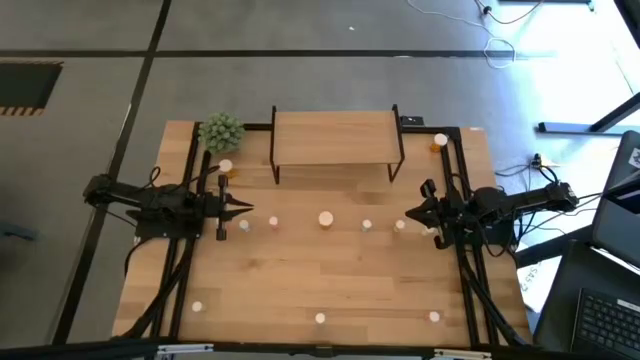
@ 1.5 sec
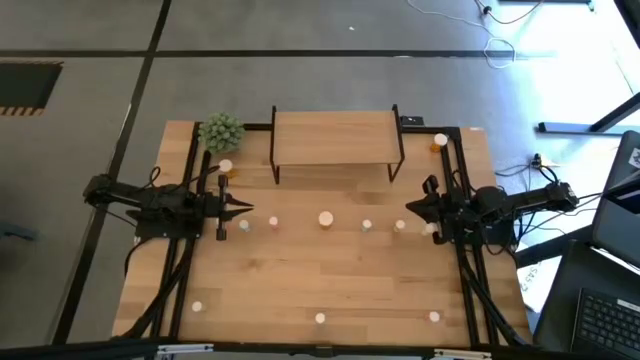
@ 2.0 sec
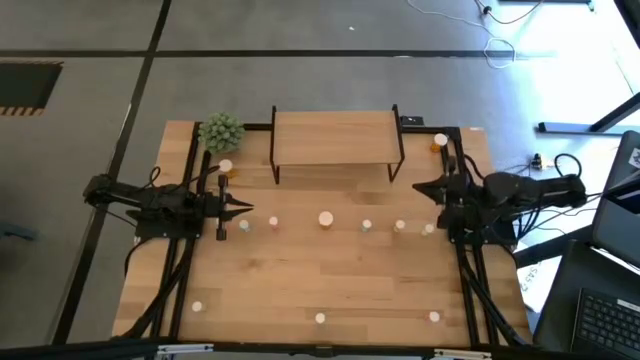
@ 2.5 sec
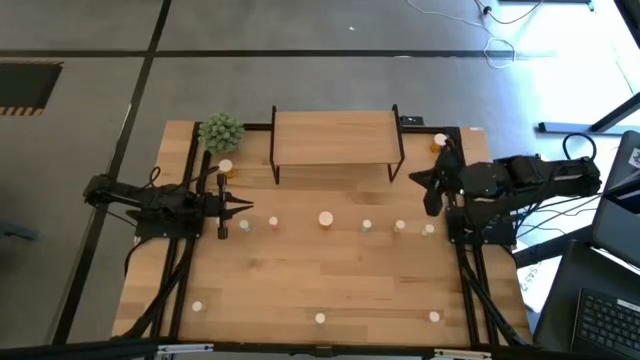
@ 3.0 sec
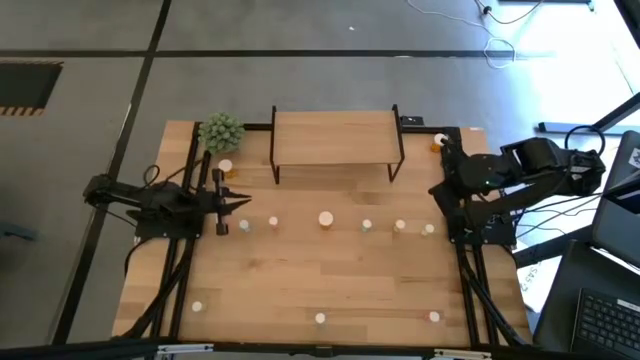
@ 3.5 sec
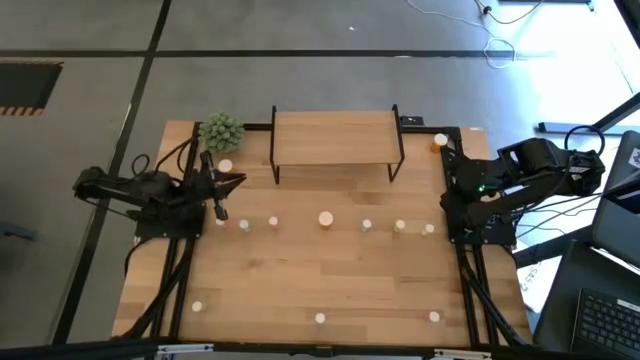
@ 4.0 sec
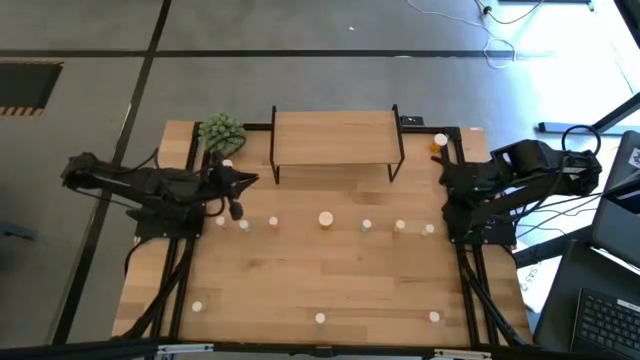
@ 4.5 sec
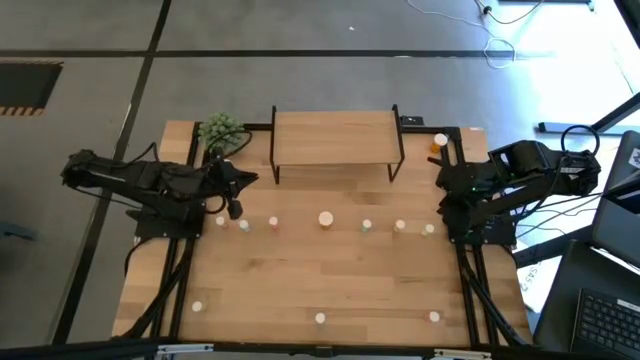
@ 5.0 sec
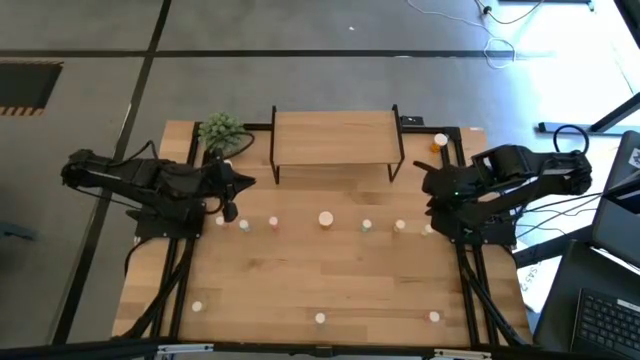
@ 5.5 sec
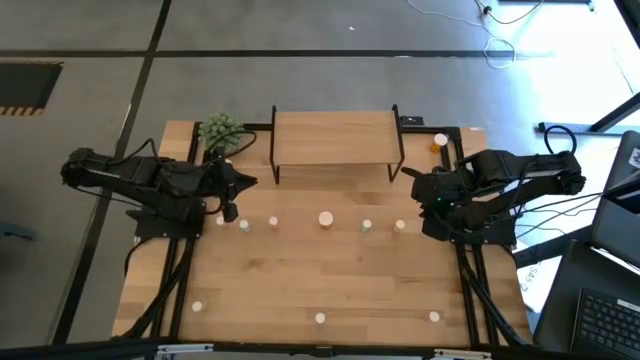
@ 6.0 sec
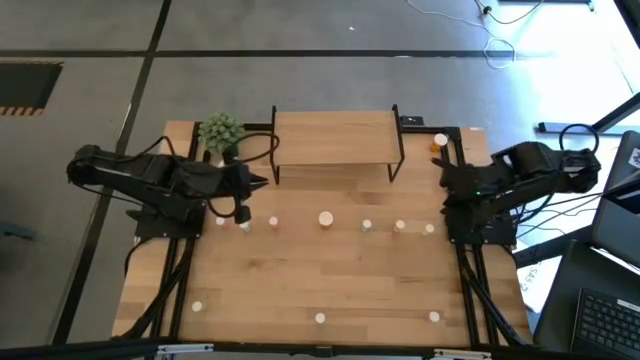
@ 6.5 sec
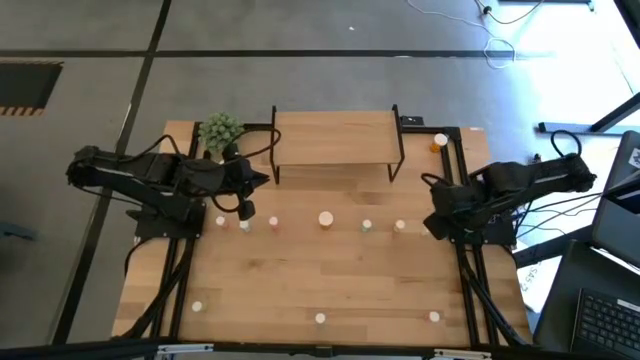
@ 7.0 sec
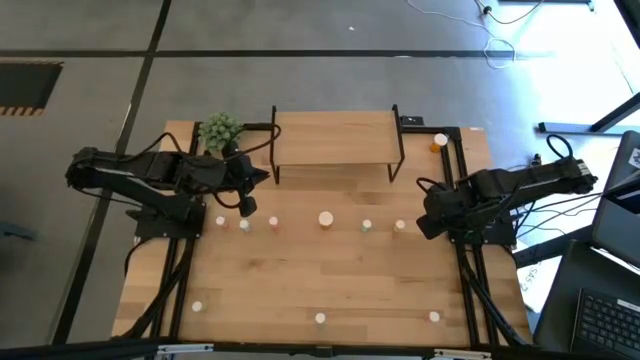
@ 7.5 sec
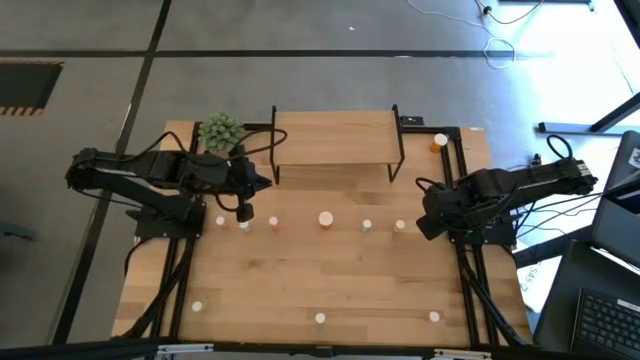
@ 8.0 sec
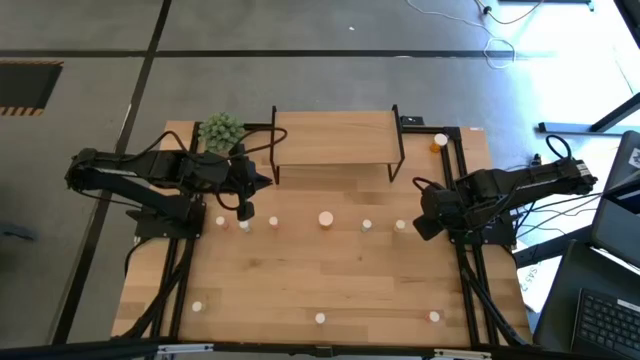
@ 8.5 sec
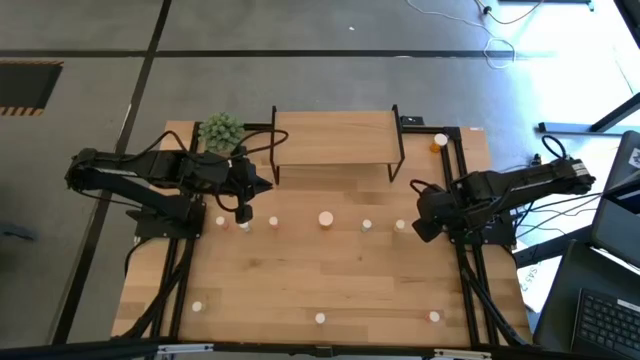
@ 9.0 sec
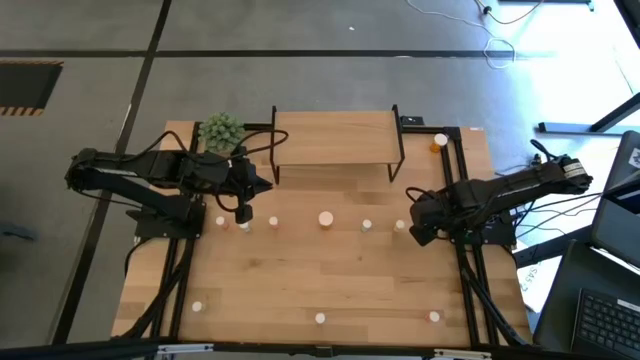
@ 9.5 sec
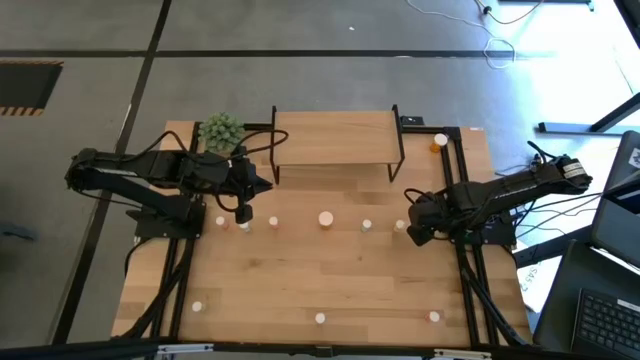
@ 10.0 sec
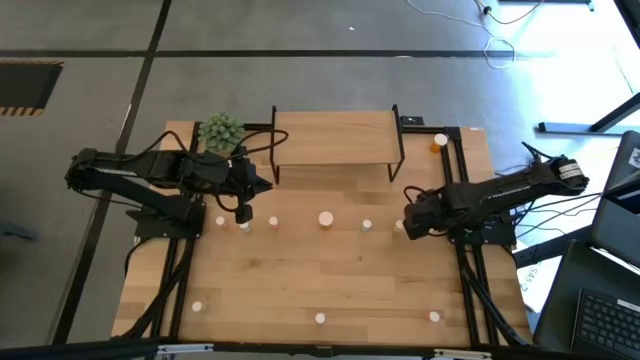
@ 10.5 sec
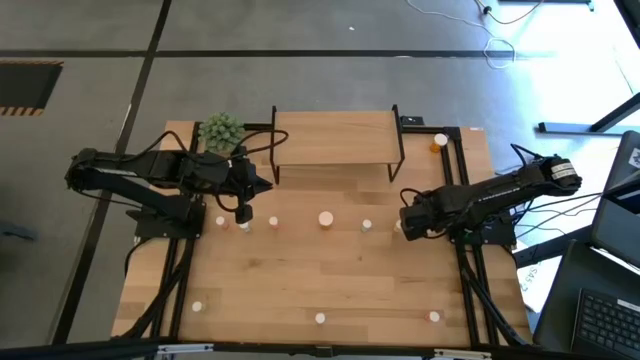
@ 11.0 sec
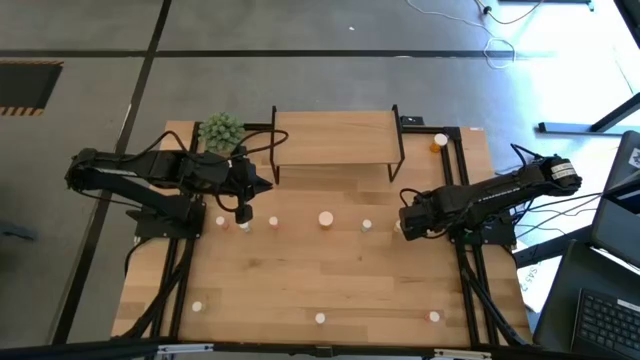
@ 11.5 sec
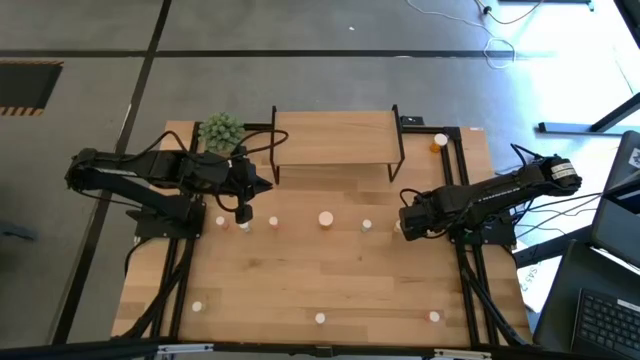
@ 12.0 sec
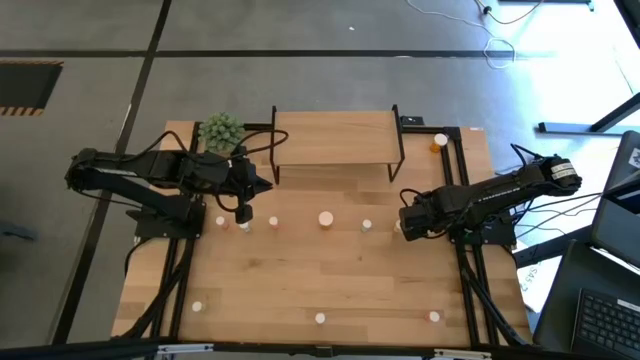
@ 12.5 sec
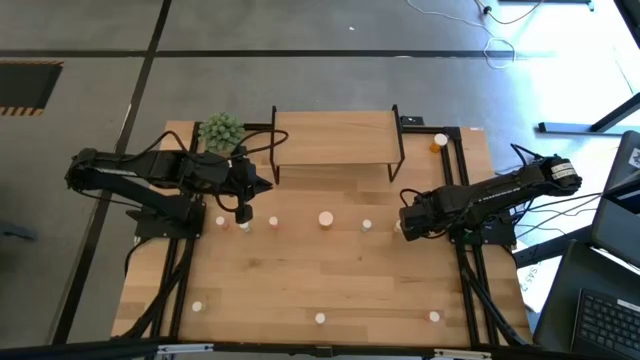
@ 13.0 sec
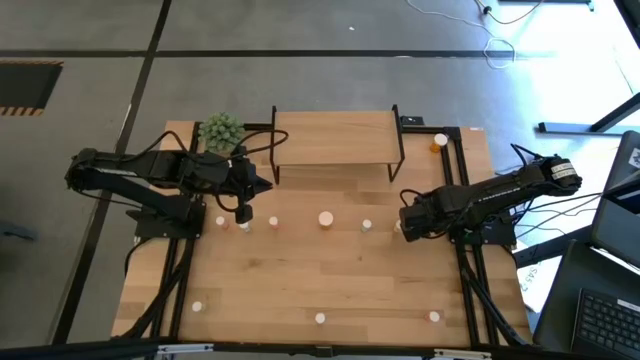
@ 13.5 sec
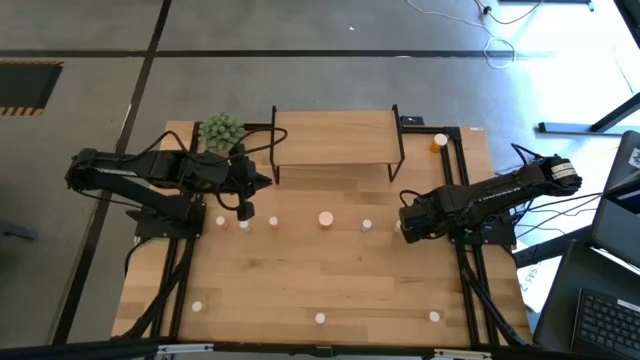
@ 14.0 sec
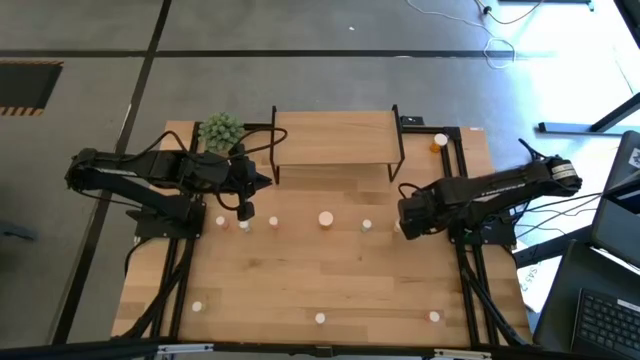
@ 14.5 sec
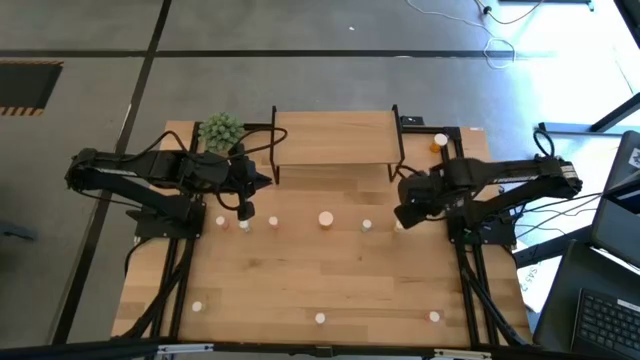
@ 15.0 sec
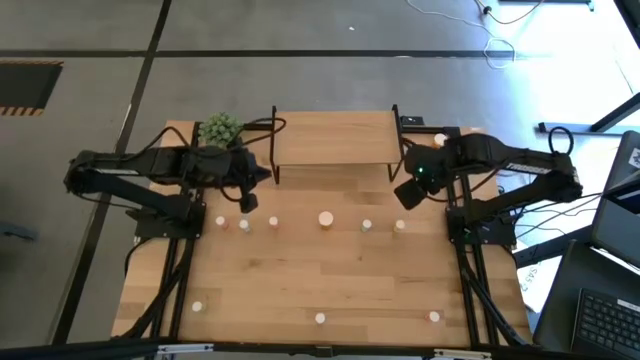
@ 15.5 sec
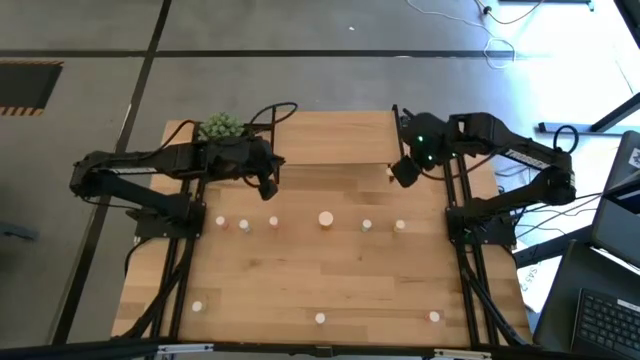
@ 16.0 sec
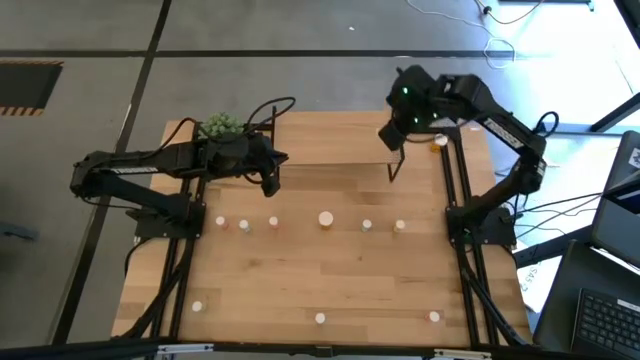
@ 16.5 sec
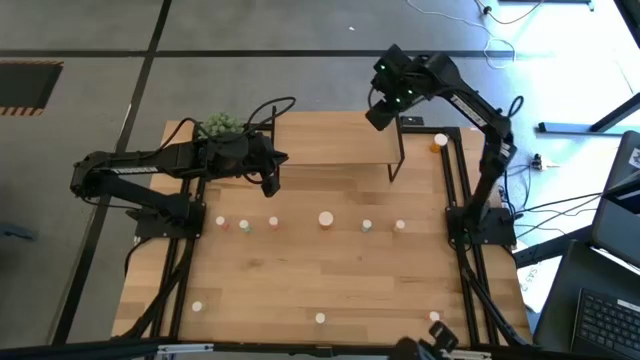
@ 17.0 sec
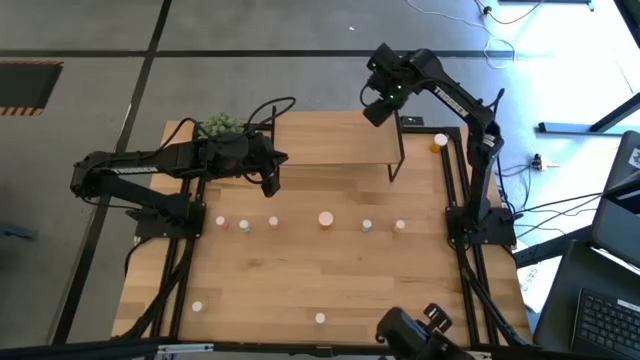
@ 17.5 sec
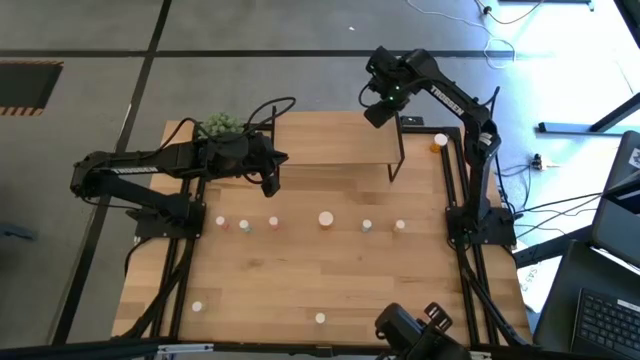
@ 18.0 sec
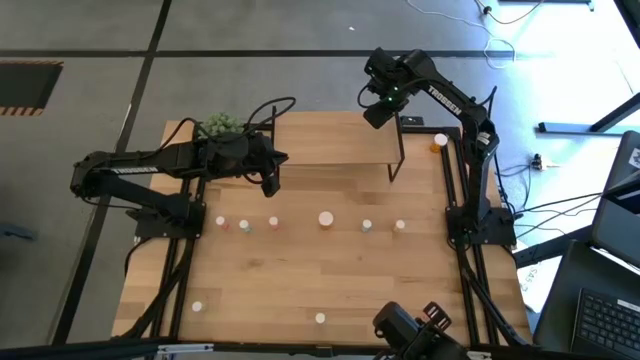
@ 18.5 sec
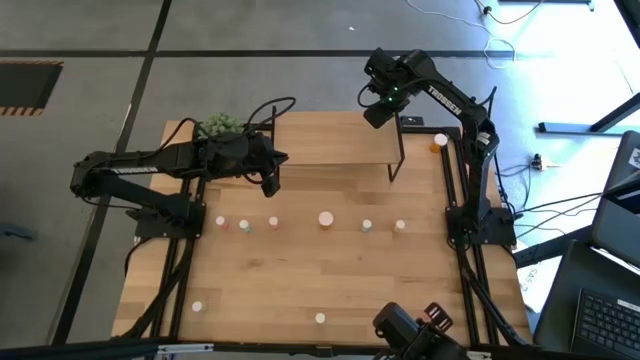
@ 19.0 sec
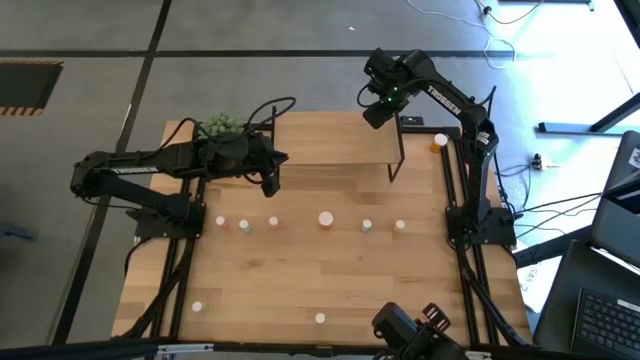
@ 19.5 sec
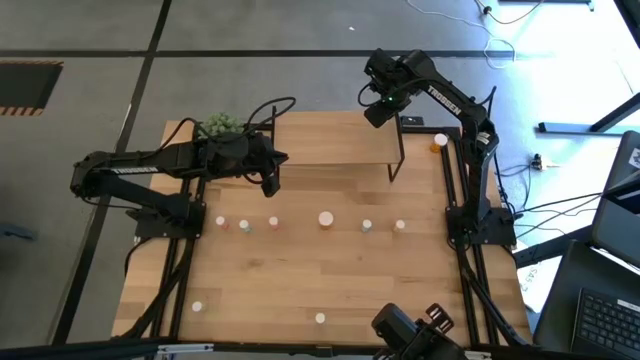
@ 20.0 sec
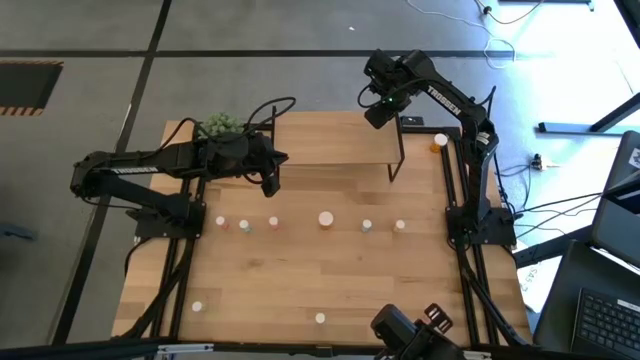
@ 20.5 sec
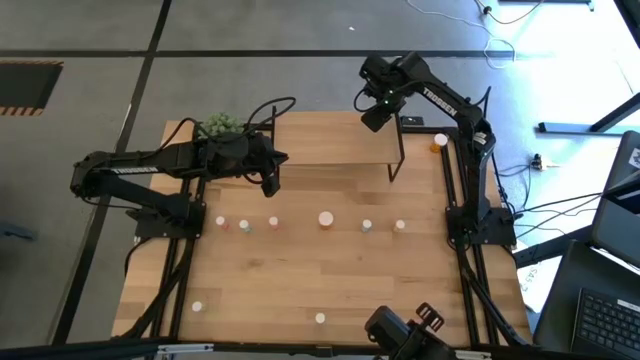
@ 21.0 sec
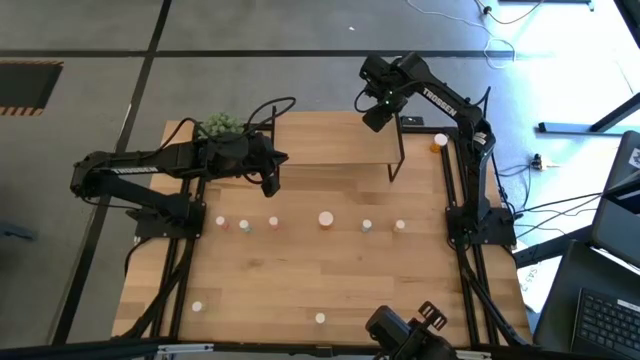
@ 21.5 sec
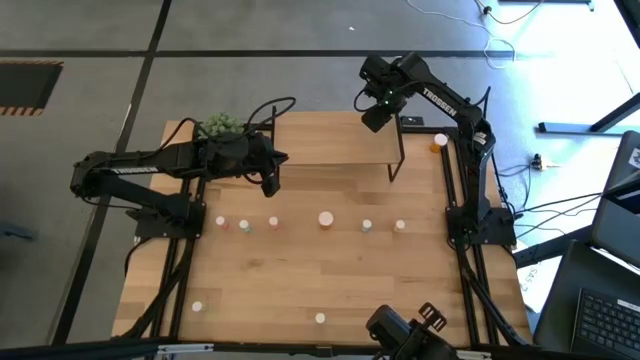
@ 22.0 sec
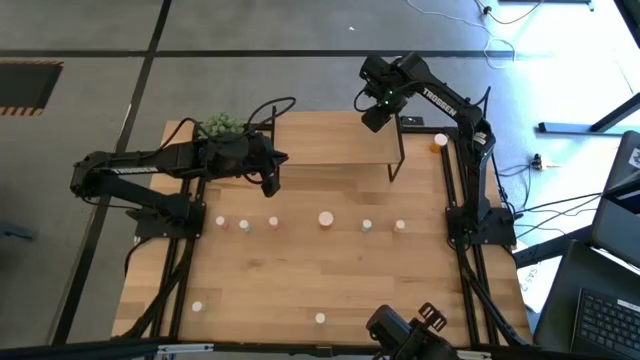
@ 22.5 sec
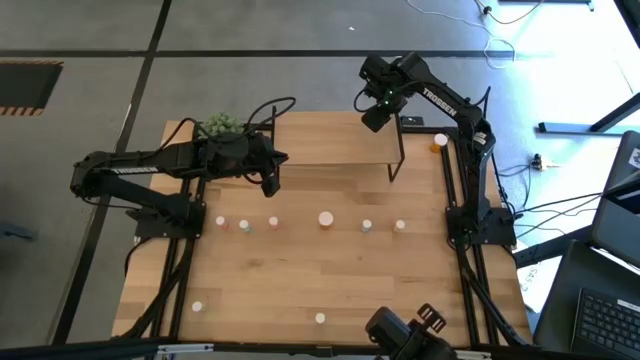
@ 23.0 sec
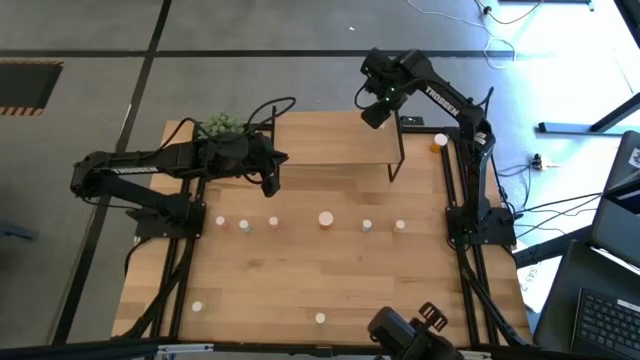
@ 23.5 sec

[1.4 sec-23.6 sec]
Task: Pick and place medicine bottles onto shelf by color
Put the right yellow medicine bottle on the shelf
